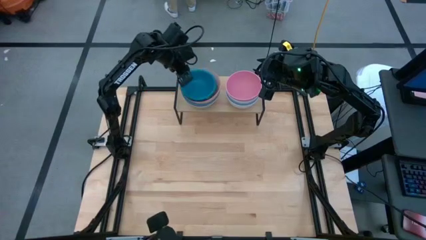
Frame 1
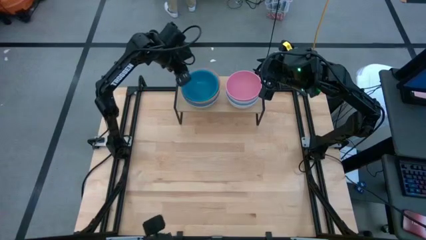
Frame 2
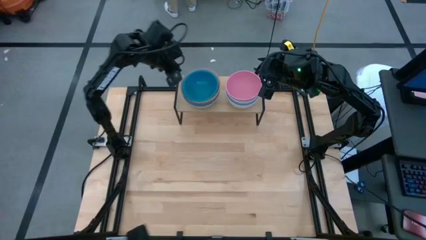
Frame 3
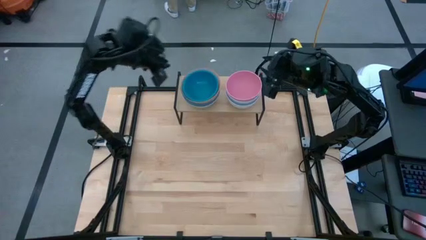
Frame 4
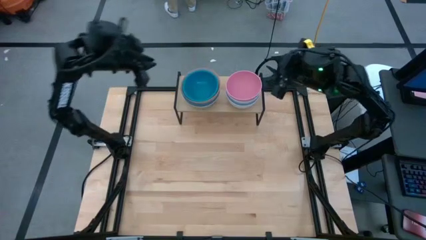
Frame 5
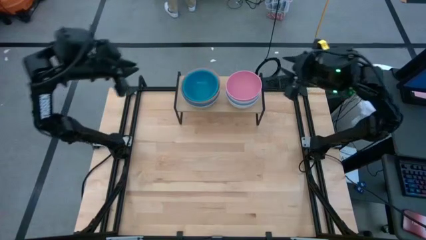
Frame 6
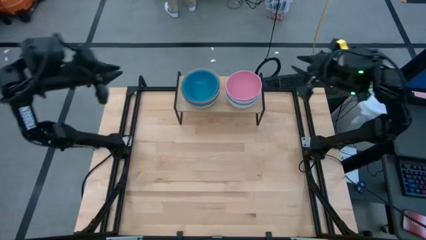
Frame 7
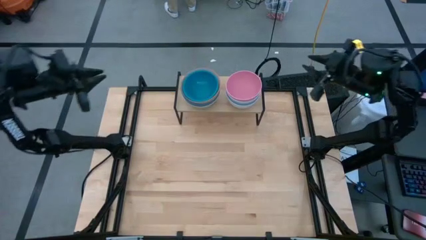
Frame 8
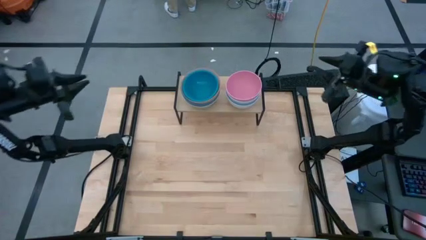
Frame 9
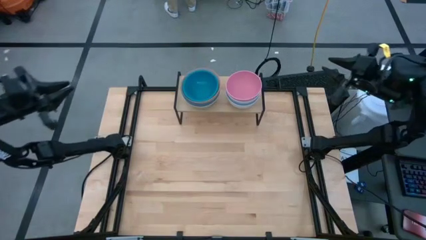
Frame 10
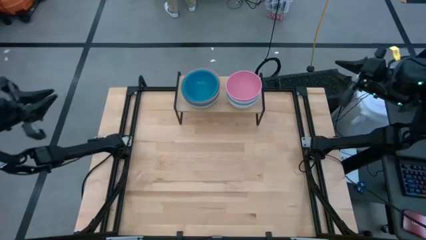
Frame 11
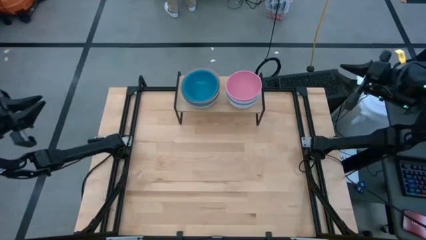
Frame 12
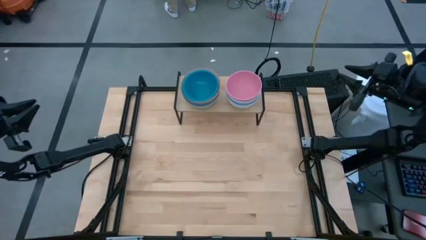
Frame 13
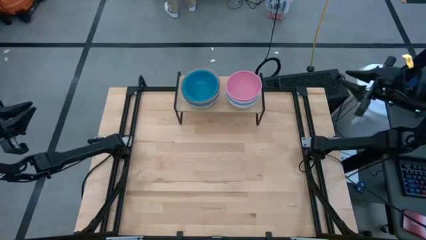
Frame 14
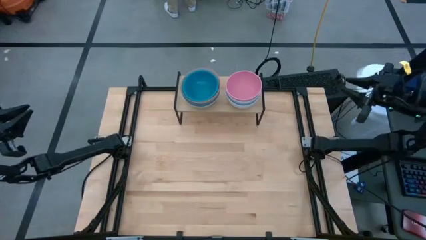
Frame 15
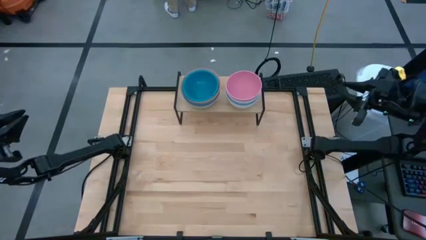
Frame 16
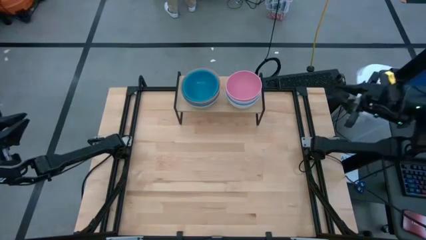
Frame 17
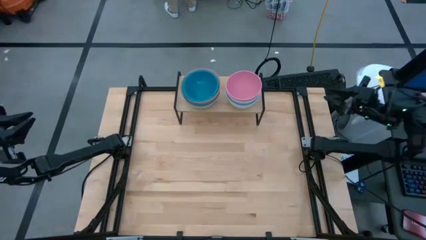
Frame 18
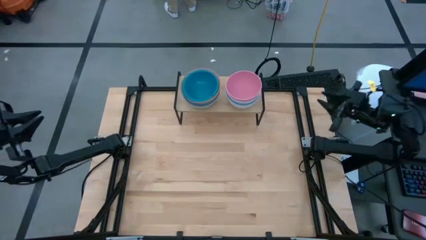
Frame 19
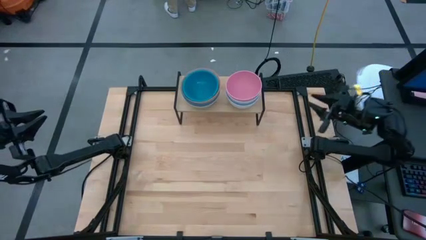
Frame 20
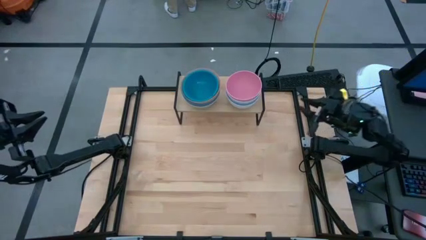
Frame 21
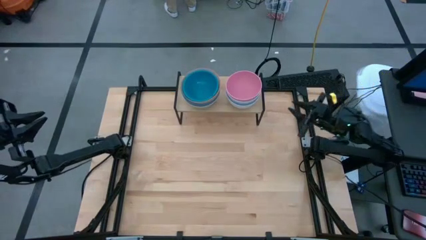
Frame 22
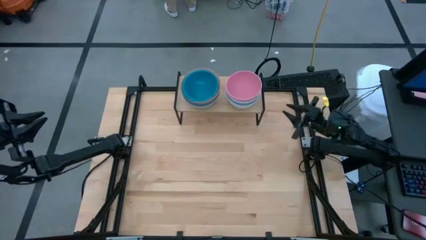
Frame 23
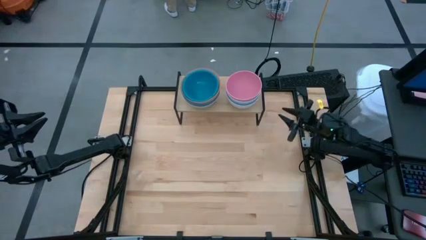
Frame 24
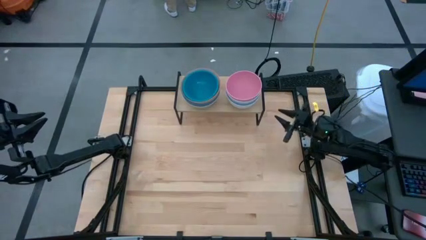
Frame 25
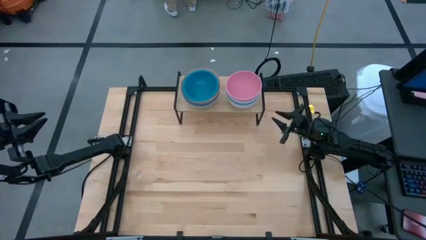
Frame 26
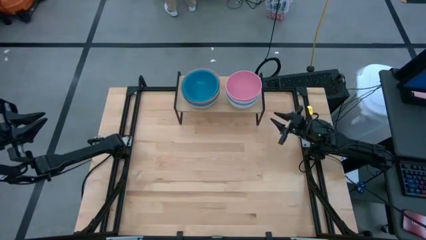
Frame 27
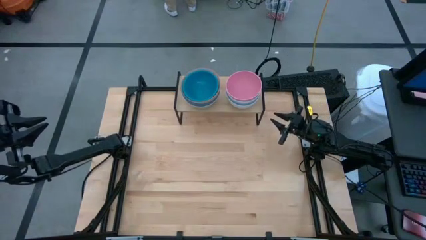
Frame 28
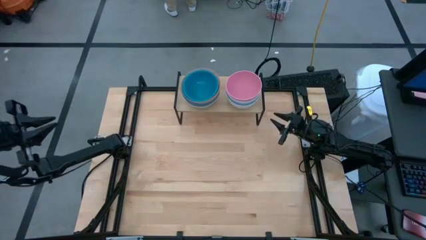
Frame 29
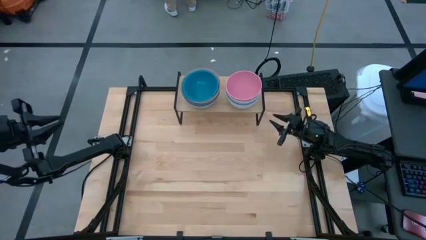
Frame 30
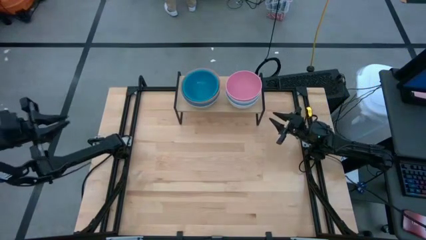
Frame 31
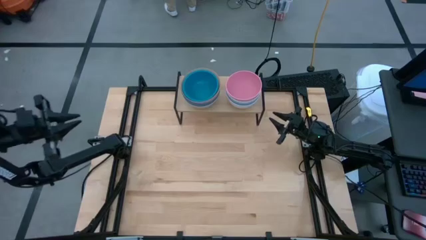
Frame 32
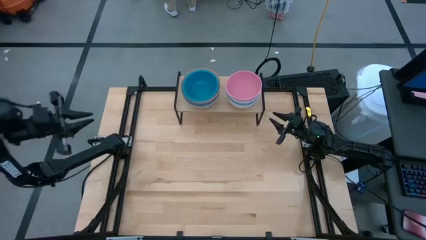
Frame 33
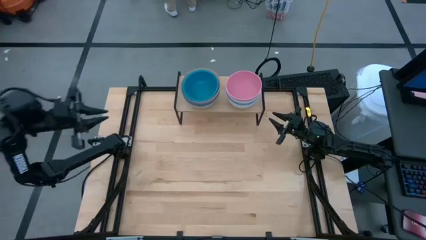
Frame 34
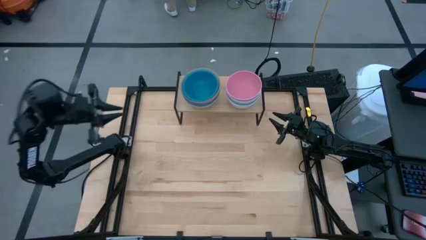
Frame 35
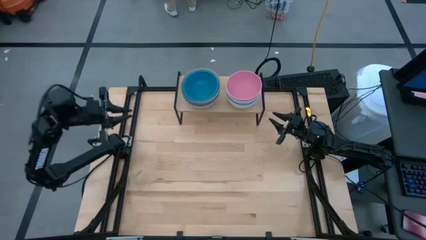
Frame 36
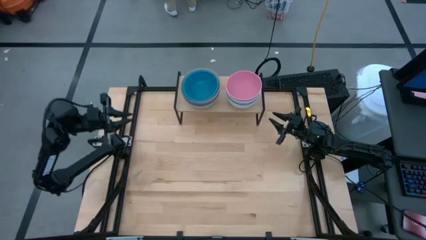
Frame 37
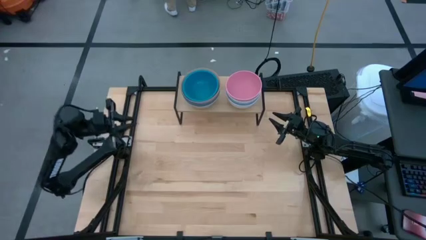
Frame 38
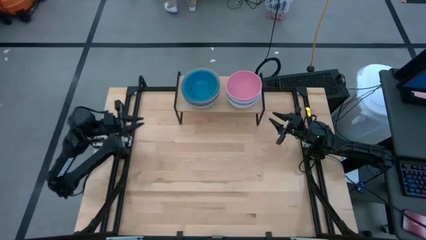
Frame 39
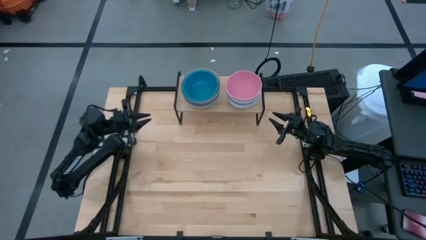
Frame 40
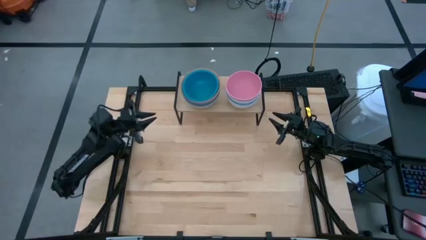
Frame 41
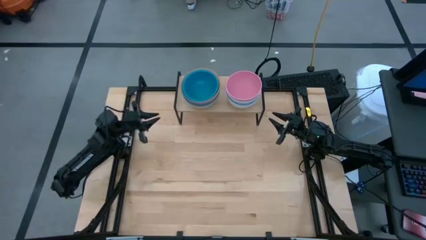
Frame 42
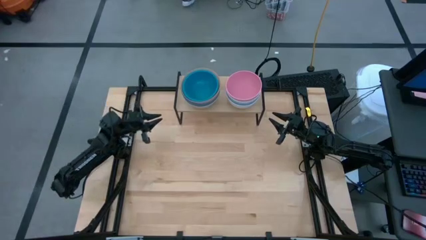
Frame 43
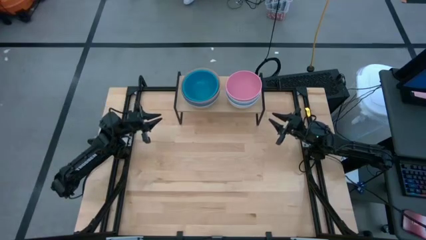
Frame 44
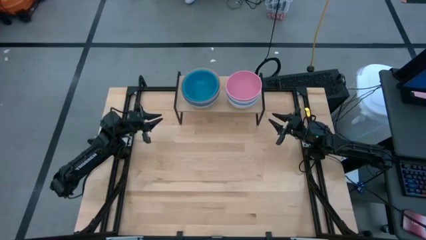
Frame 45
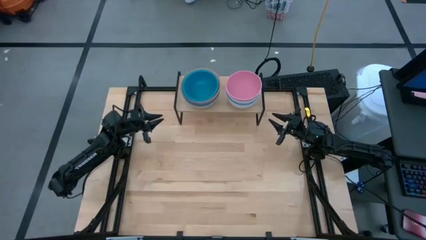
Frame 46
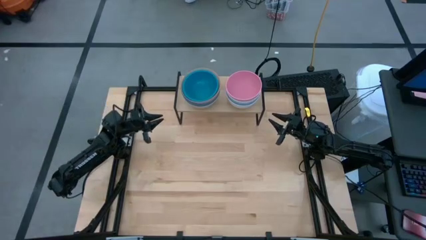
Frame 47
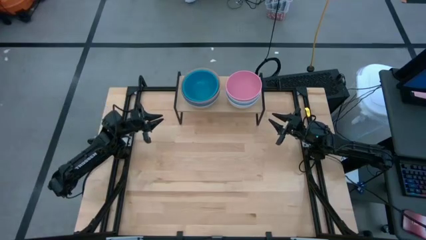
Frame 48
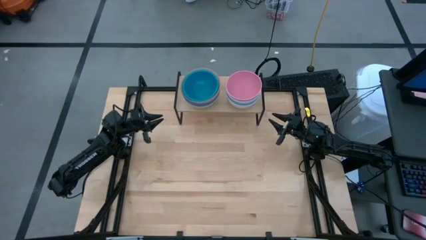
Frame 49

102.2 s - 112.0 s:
Task: Place and stack bowls onto a shelf
Return to Home Position

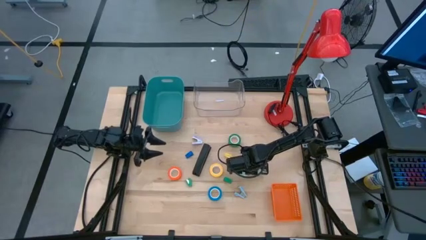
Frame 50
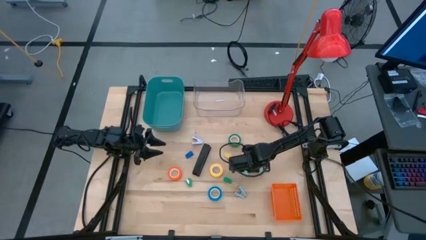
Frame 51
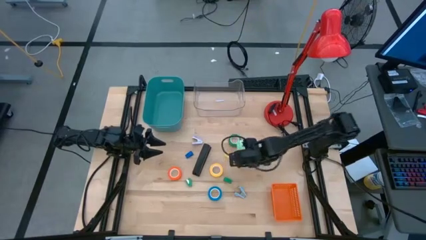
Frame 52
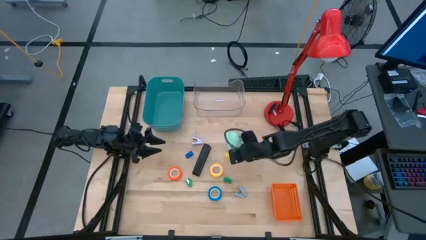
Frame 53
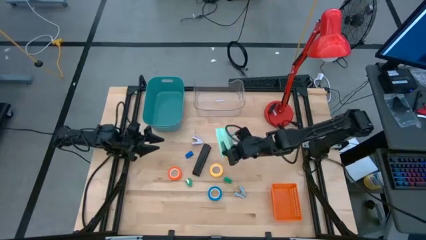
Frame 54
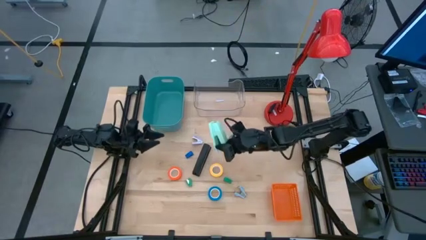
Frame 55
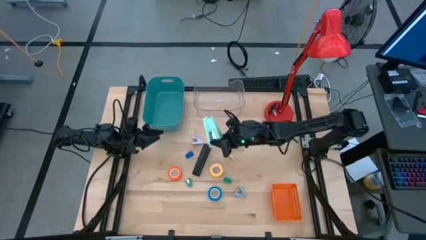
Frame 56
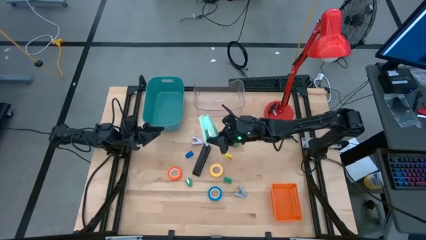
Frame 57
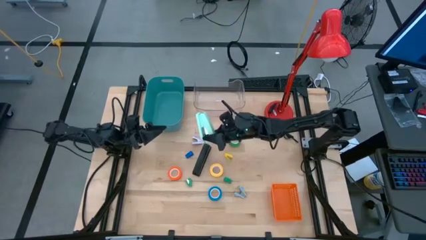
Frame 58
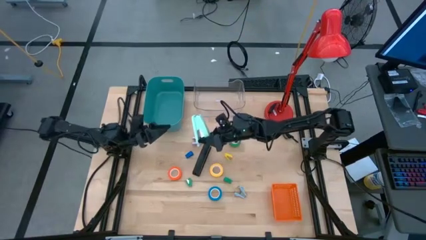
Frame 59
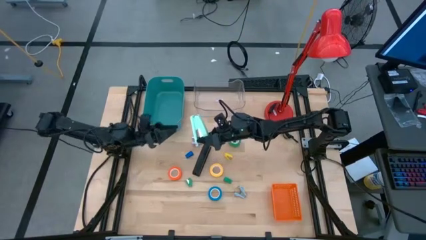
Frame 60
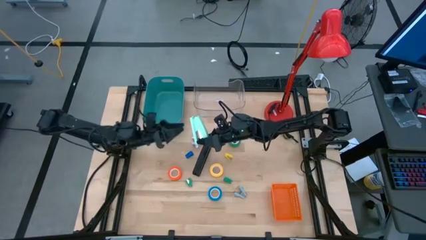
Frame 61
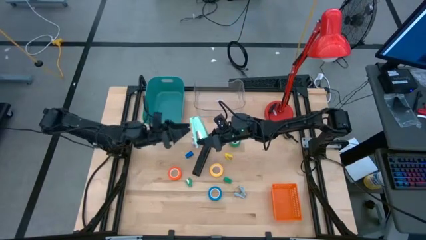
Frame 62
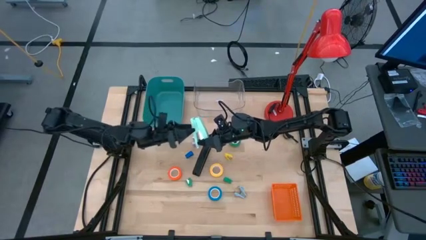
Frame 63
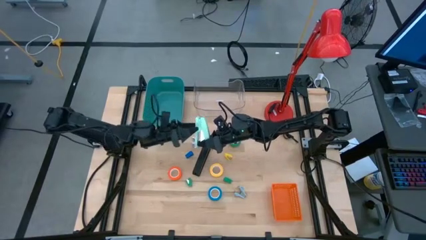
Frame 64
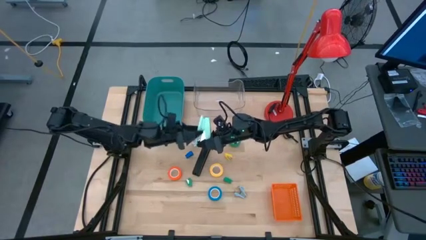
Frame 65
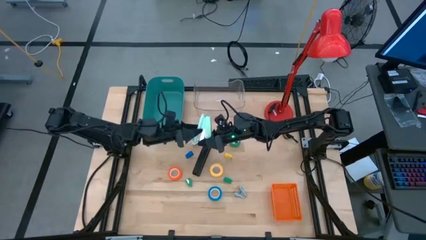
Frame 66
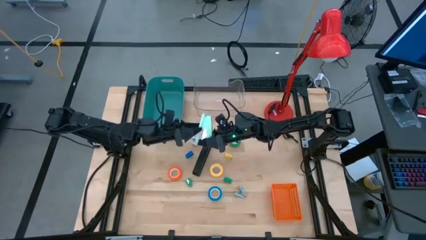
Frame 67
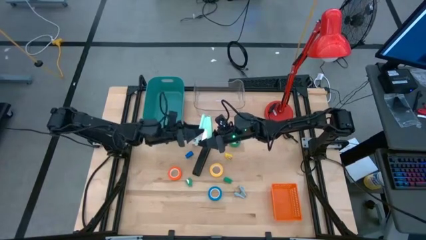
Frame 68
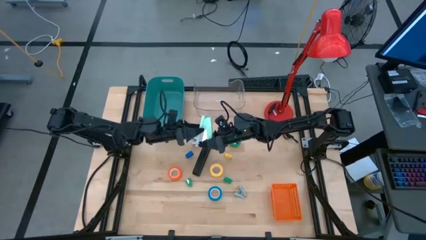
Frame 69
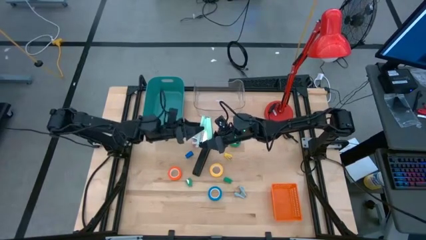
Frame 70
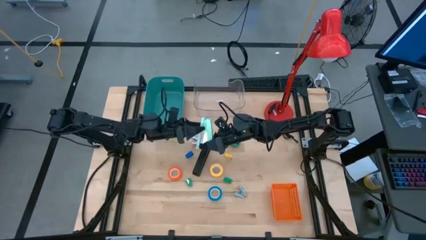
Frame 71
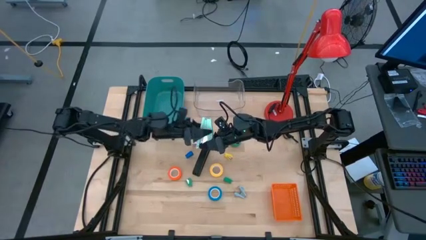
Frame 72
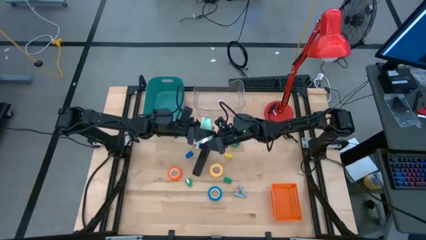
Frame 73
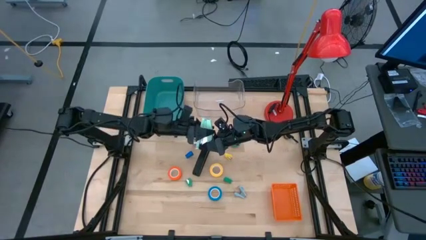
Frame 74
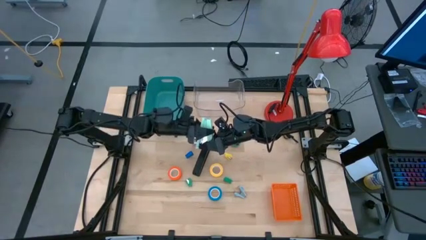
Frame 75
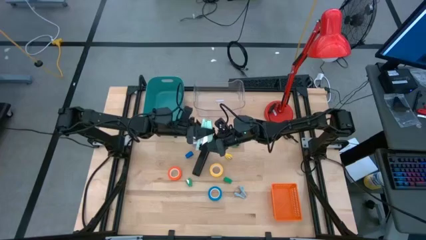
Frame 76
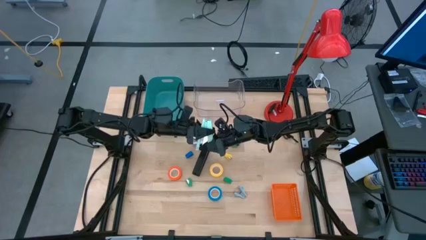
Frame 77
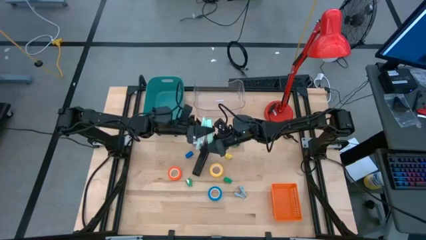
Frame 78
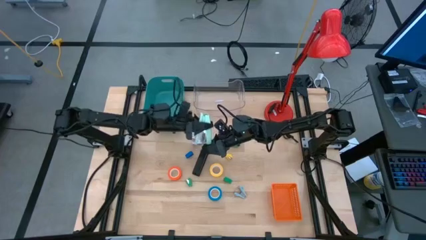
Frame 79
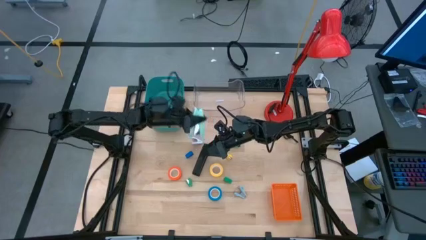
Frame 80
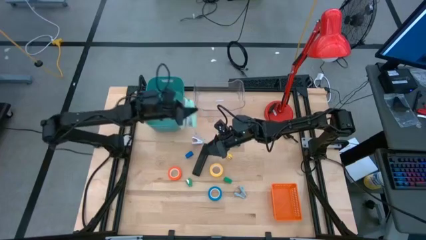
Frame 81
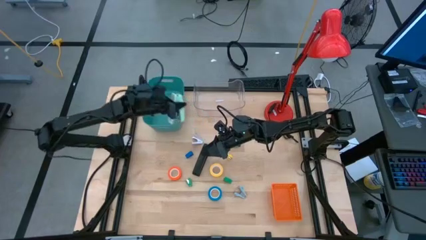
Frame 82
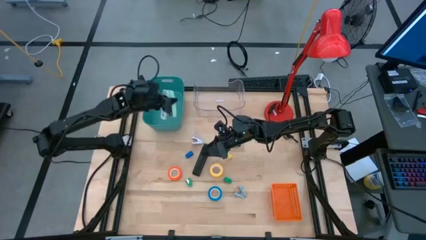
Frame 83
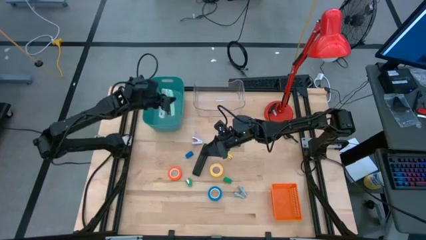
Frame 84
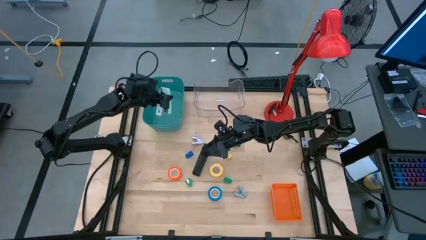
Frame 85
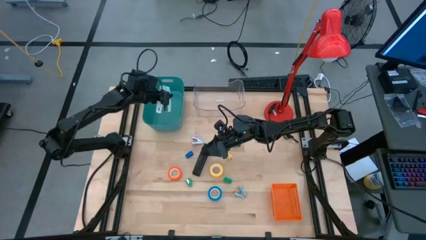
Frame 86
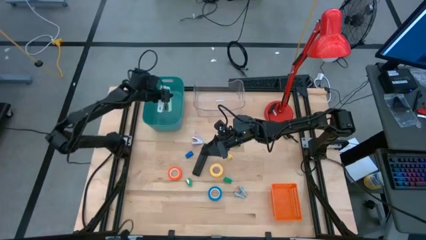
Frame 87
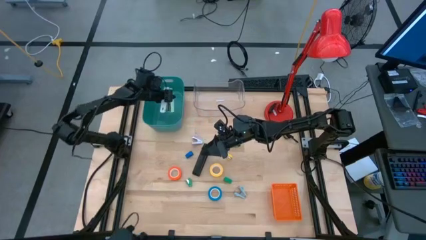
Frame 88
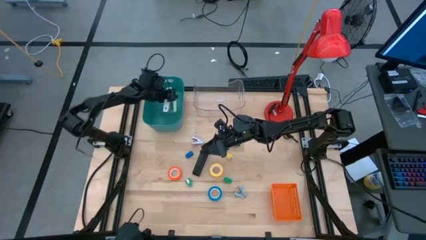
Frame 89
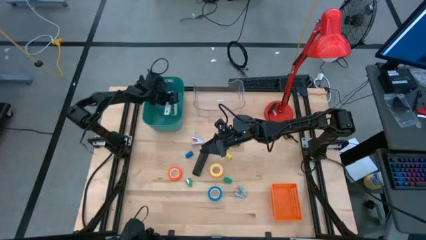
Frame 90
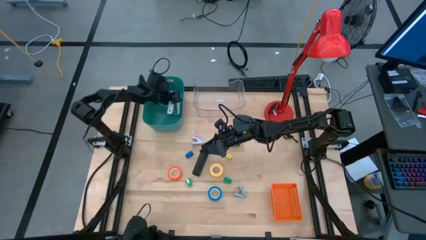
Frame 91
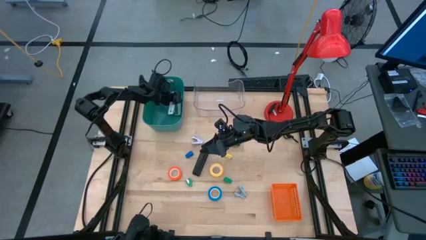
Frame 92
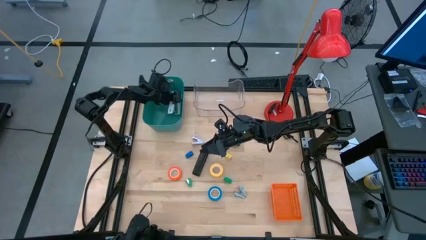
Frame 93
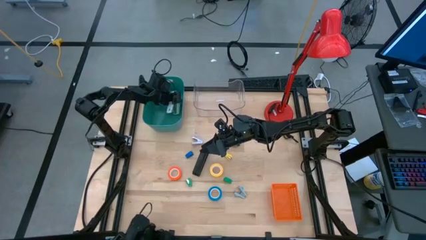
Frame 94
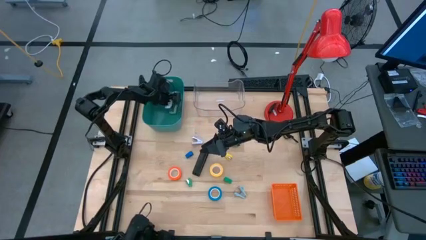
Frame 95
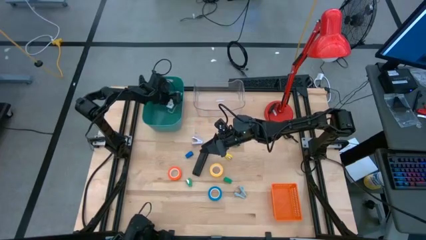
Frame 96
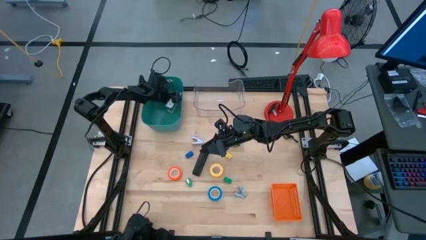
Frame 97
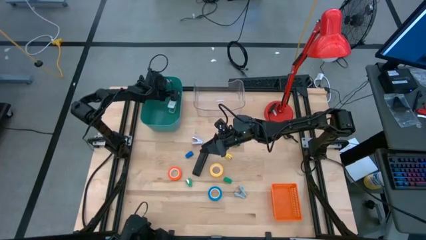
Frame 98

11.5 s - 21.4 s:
Task: Pick and place Stapler, Stapler remover, tape
Put the large light green stapler into the green bin
